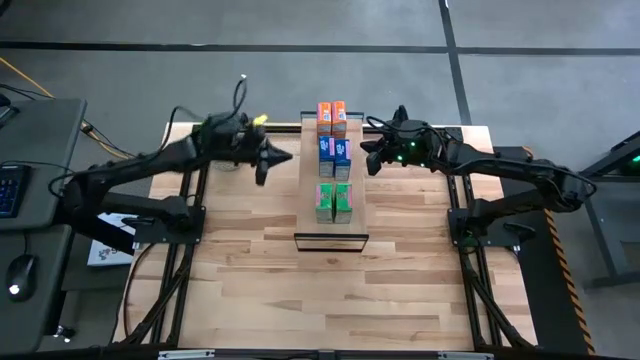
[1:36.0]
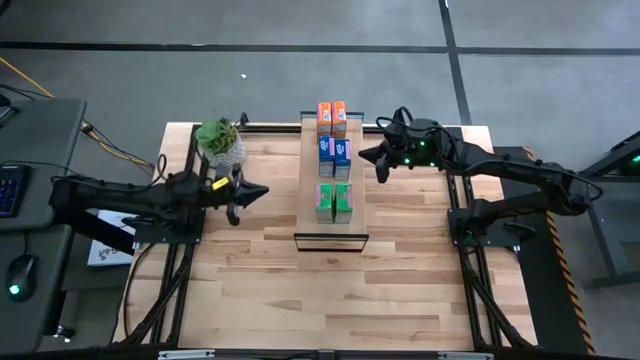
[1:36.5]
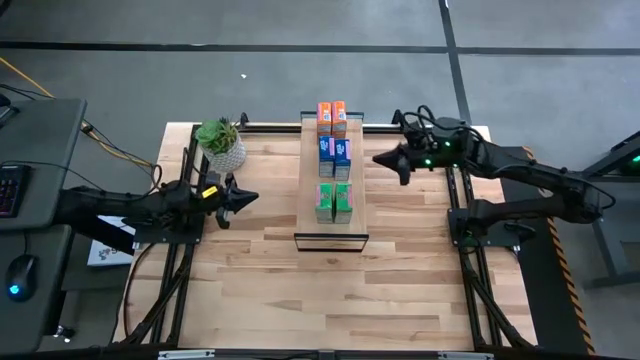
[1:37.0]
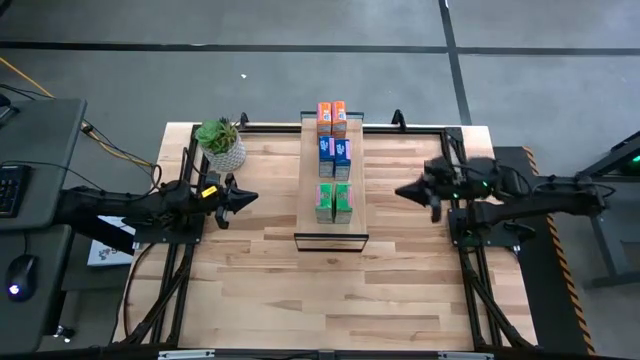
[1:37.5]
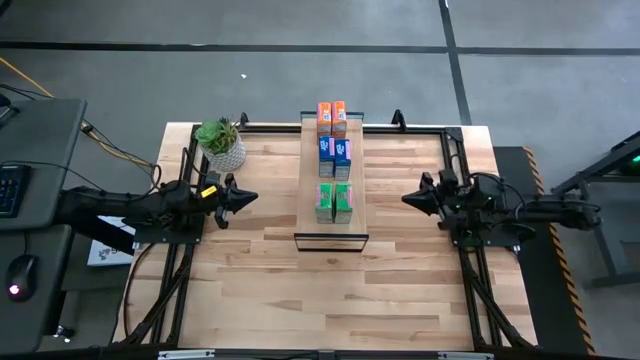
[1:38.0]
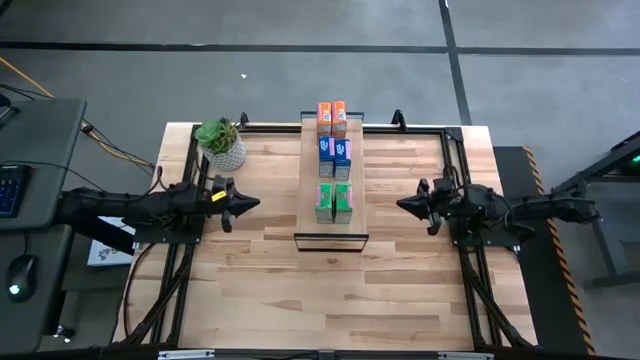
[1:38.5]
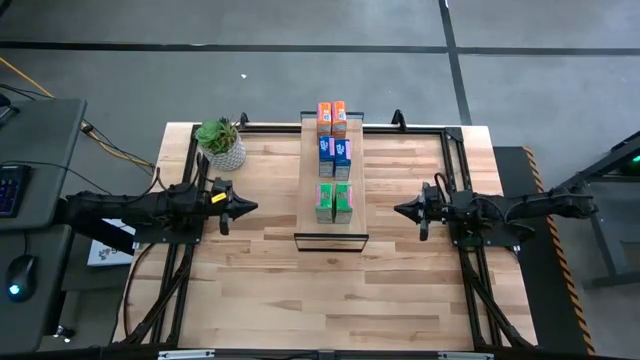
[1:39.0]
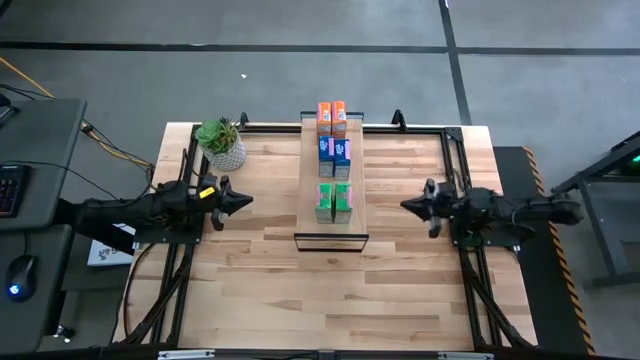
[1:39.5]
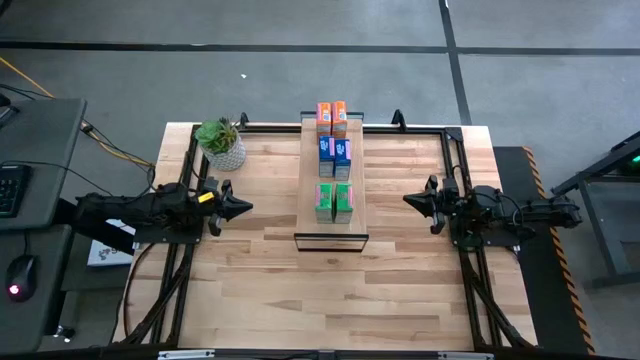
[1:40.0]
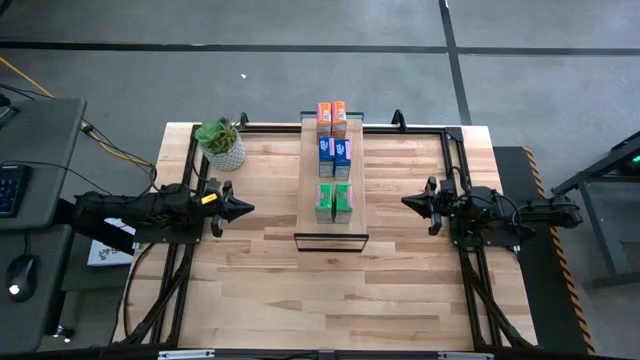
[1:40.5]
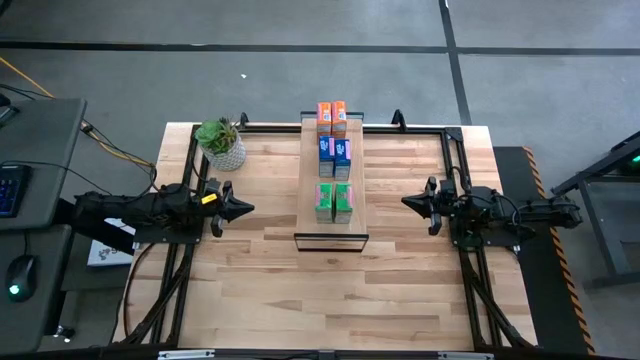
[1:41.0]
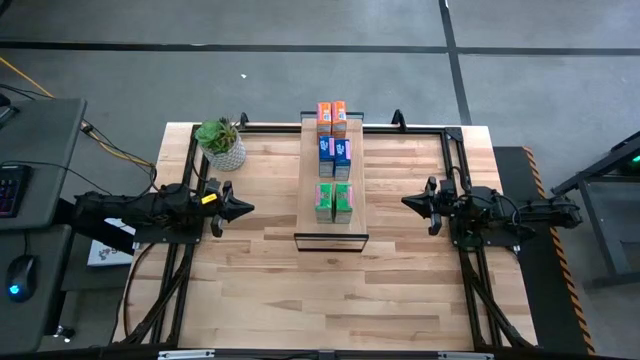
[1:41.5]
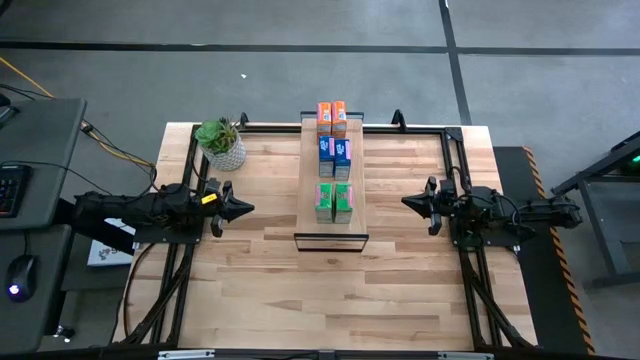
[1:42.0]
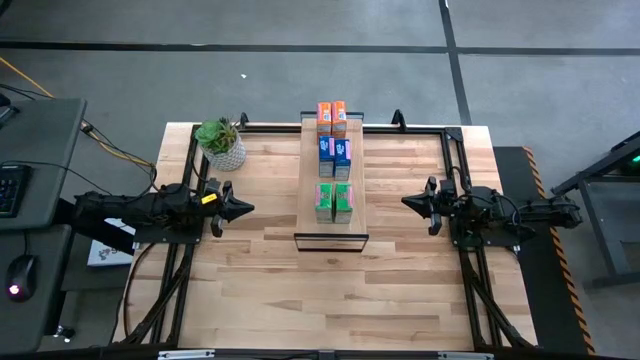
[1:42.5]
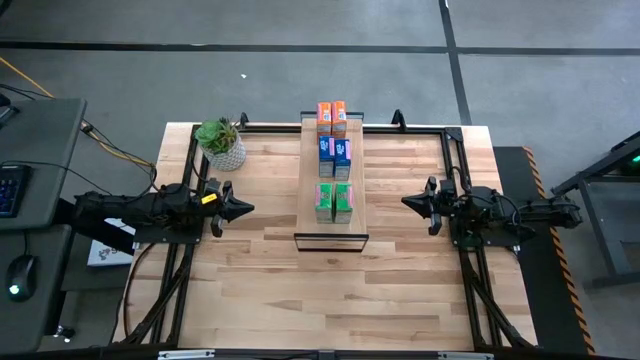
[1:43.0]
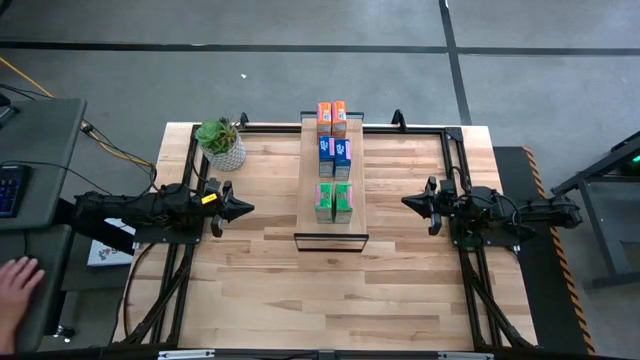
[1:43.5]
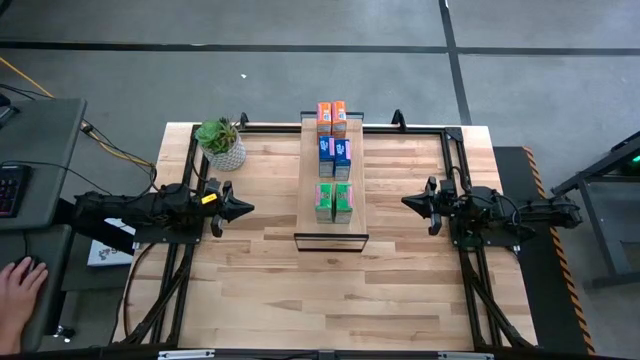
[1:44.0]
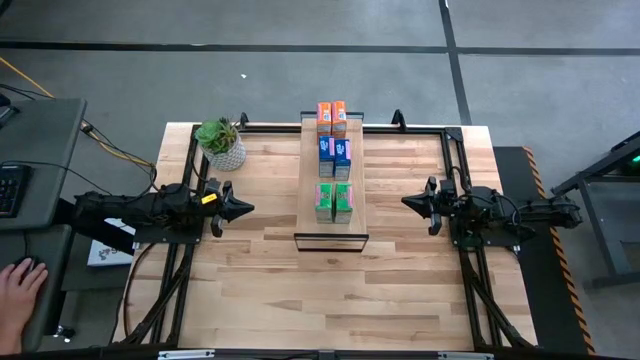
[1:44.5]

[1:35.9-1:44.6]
Task: Stack cereal on shelf
Return to Home Position

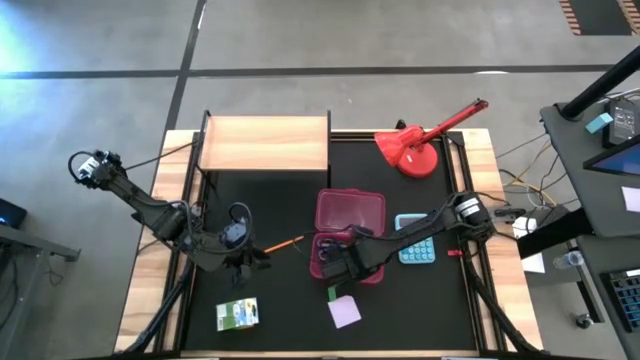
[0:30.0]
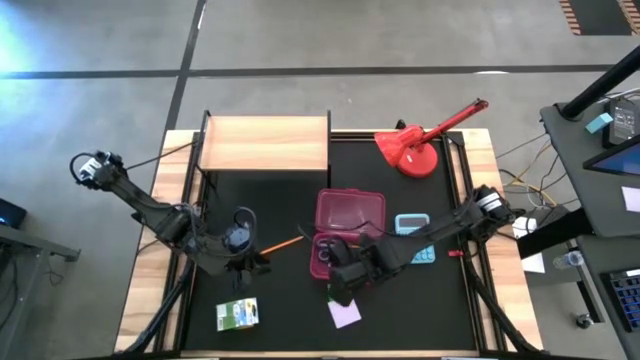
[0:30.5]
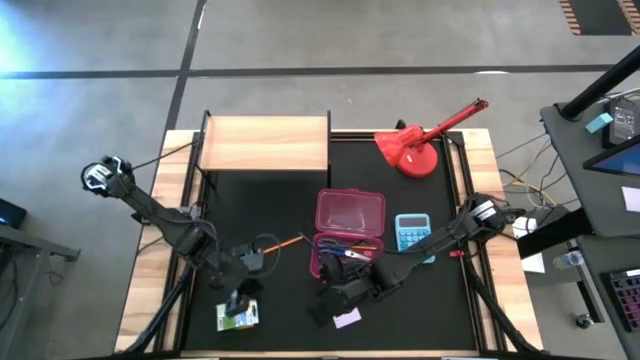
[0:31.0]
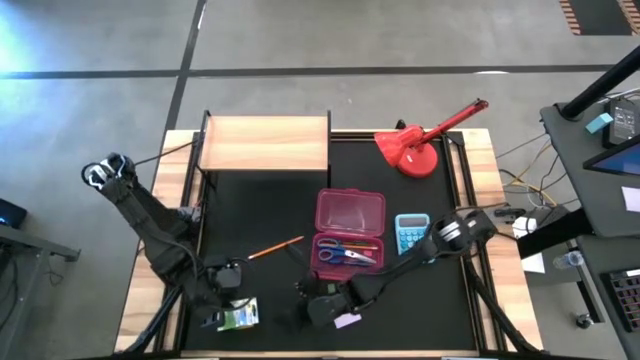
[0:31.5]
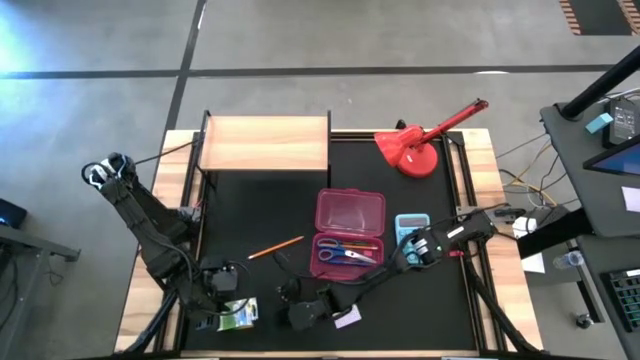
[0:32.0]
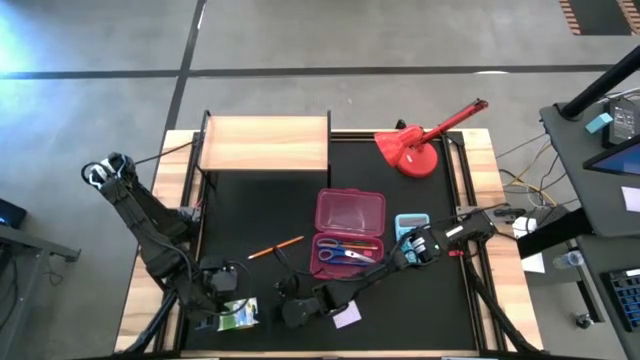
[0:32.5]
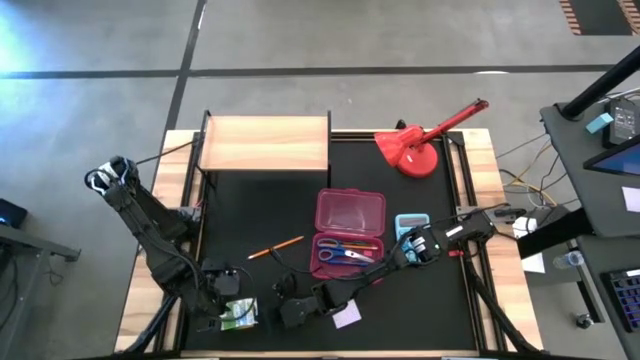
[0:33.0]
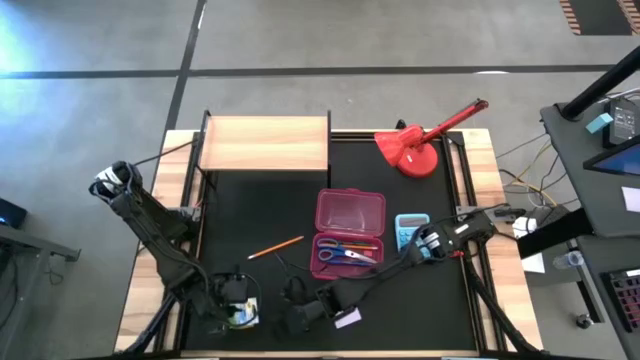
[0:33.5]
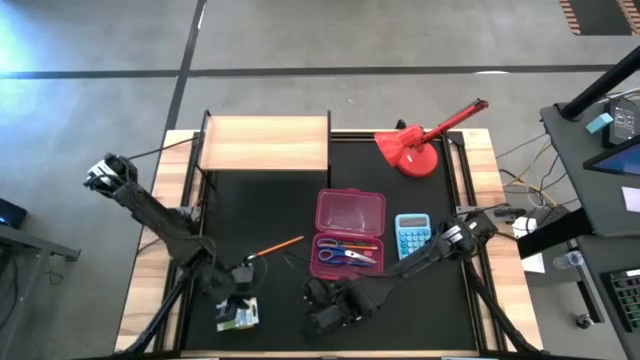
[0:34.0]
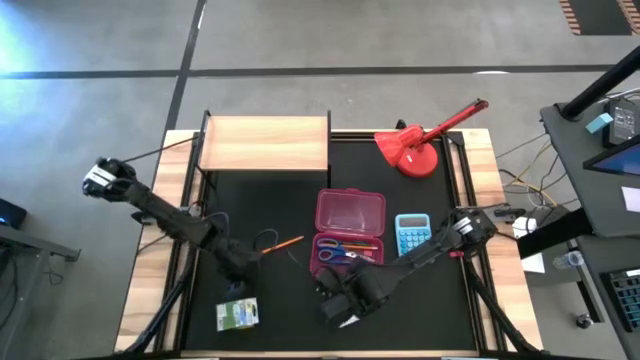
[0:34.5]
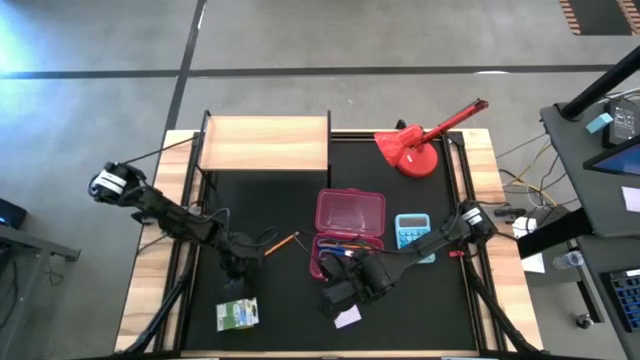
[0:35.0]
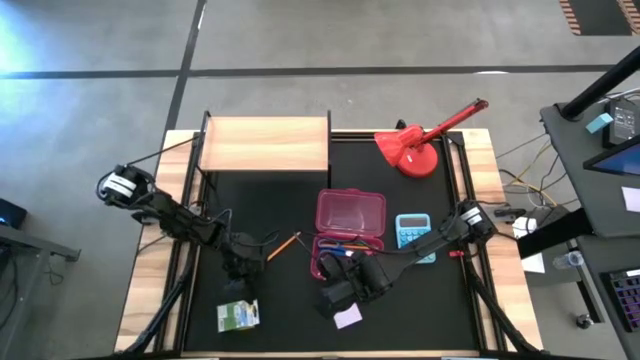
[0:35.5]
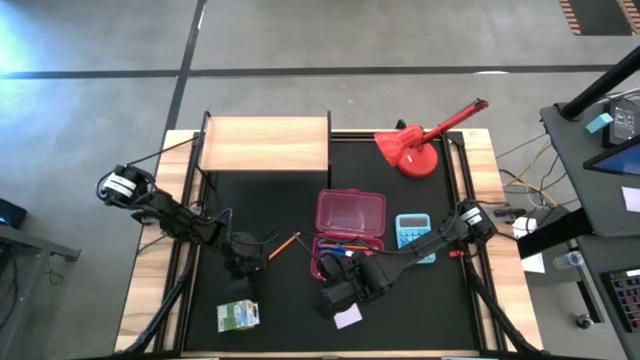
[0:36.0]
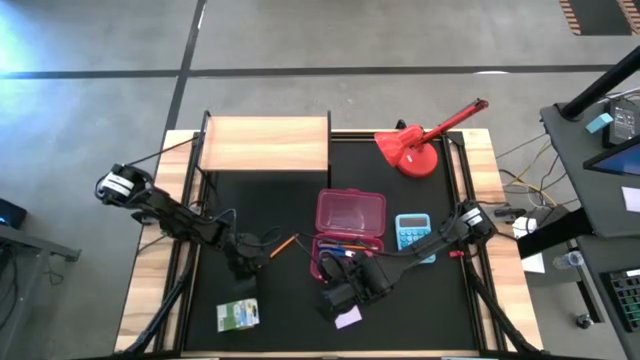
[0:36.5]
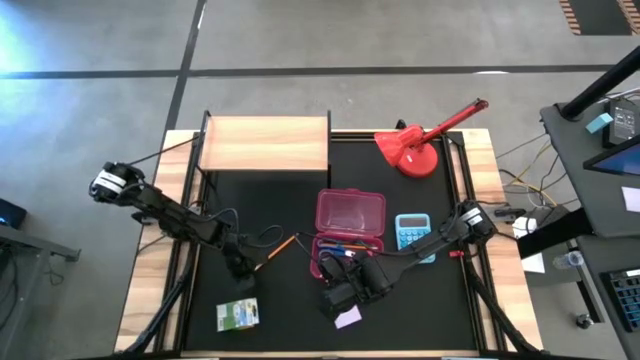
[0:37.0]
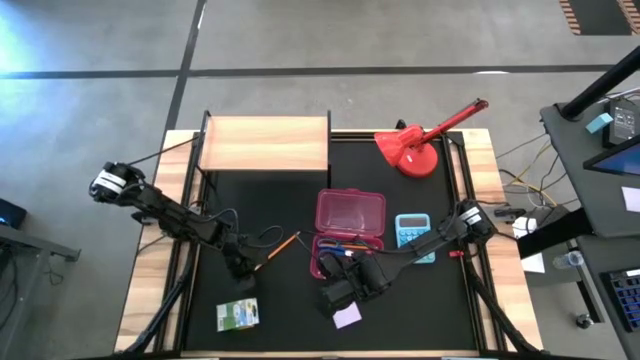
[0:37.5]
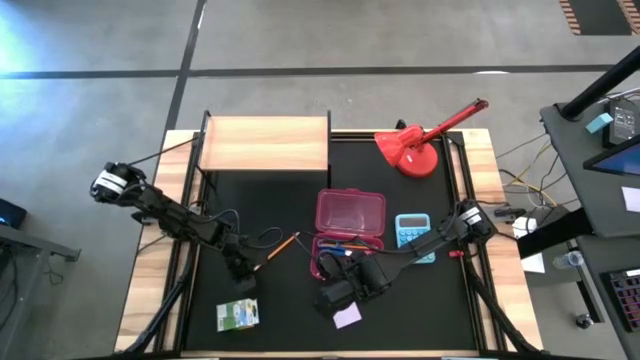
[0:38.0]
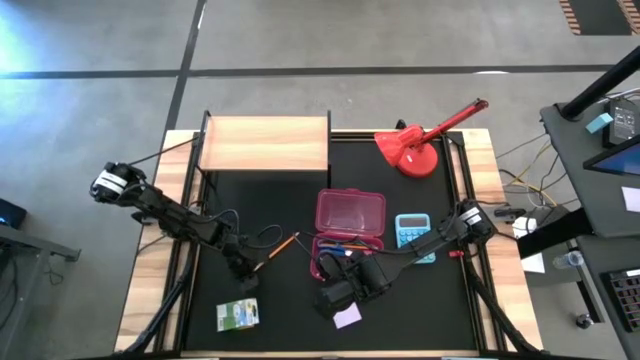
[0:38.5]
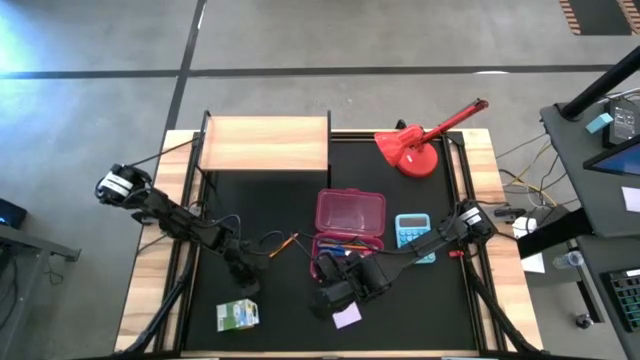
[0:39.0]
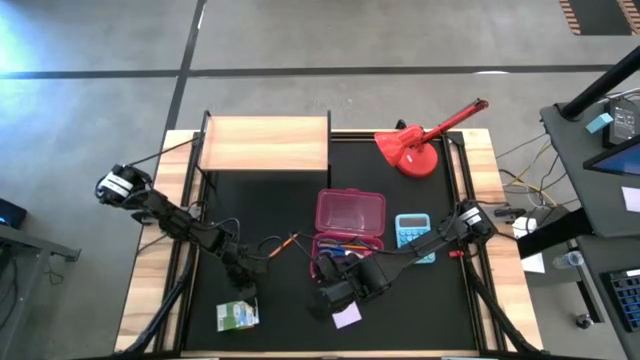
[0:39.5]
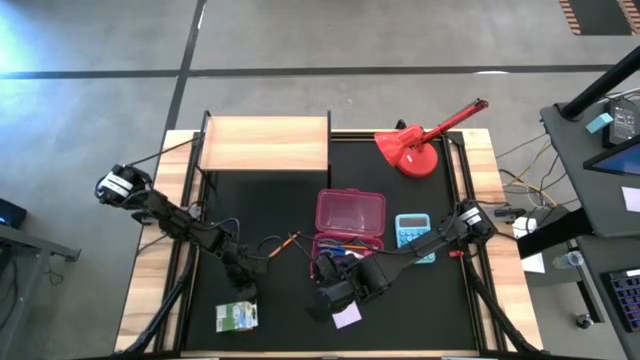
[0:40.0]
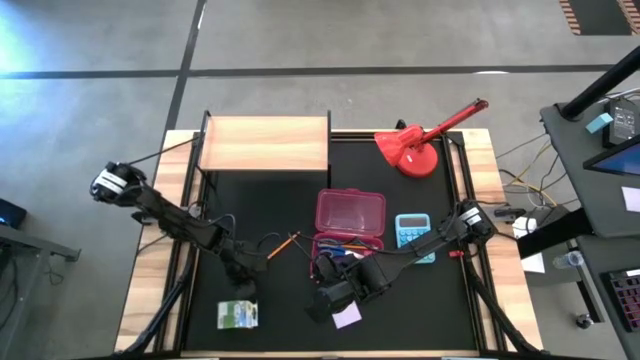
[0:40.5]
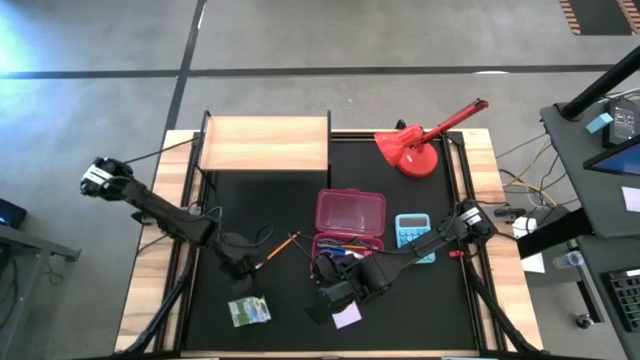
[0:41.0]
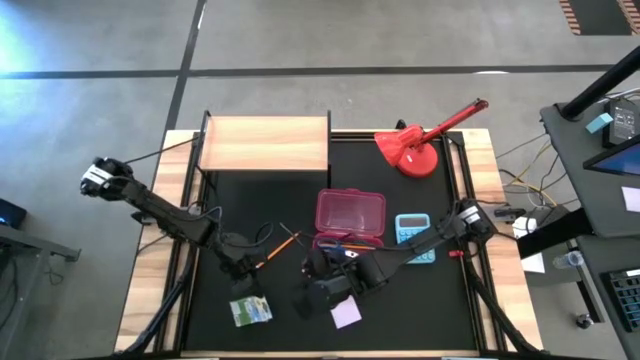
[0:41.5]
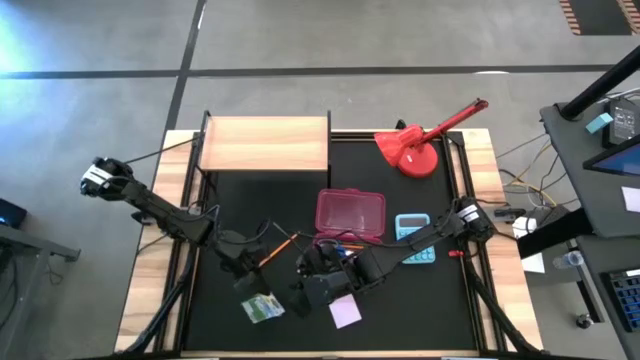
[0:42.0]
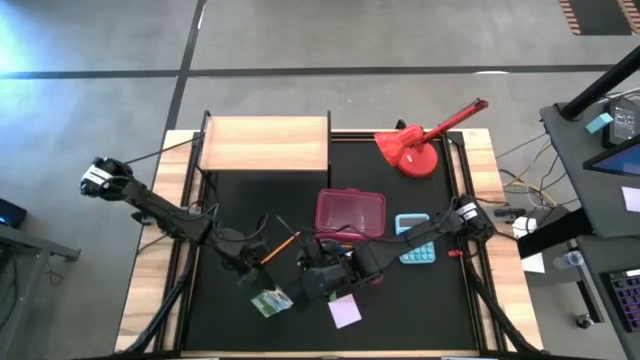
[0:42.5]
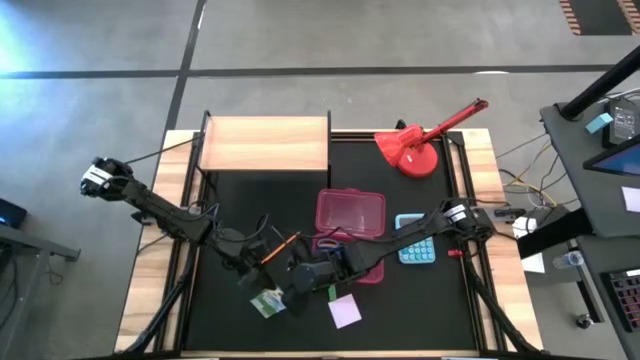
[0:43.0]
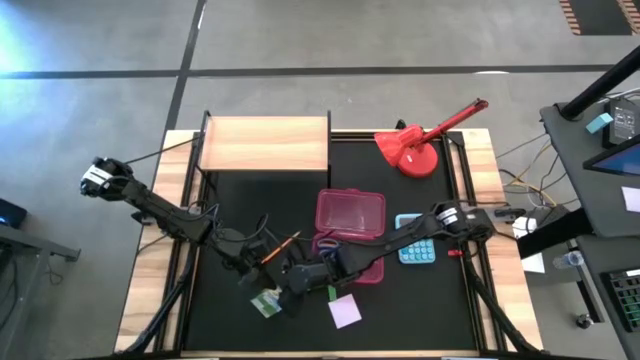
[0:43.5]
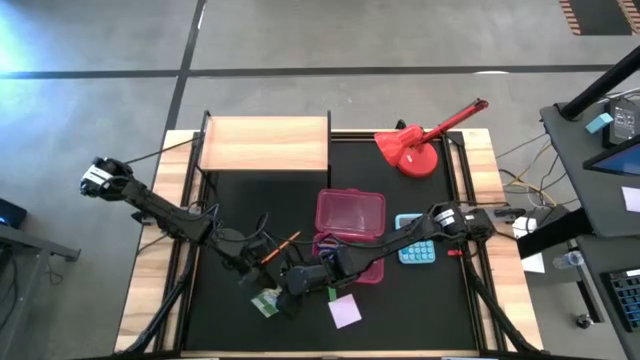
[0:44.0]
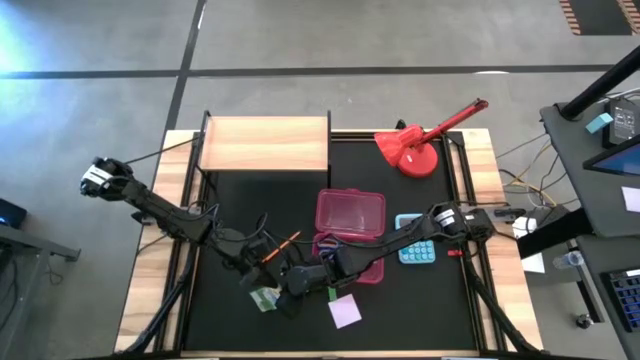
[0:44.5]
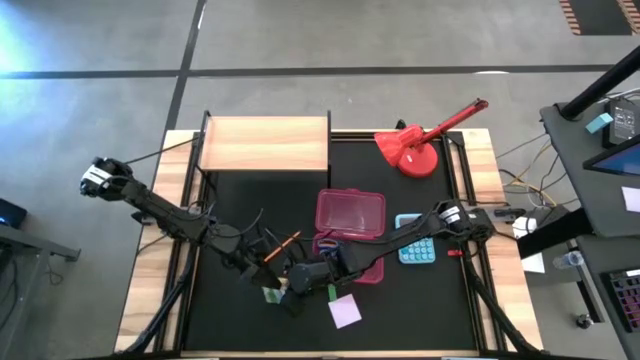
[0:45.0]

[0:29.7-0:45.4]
Task: Pack school essentials
Put the green box of crayons into the pink supply box
